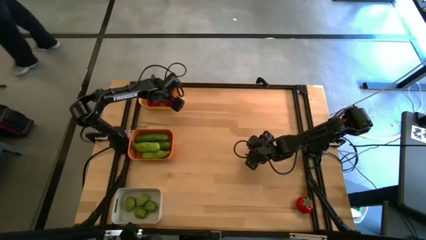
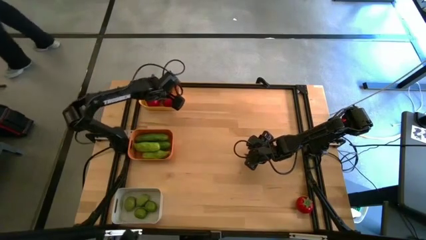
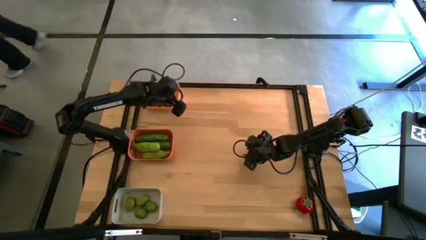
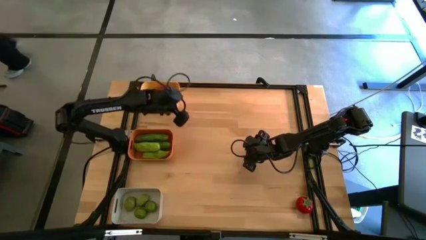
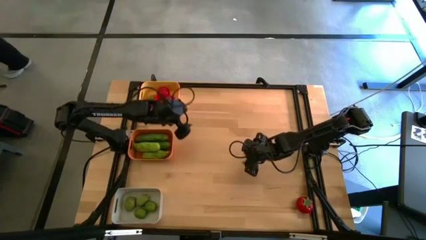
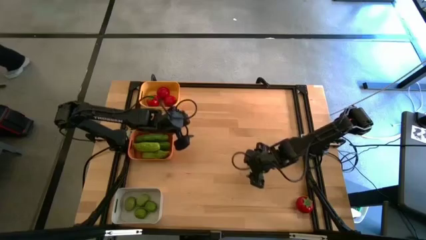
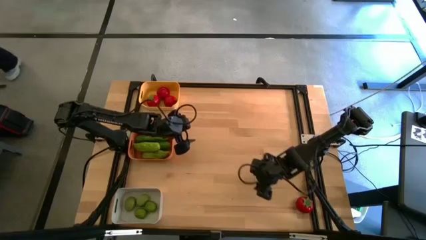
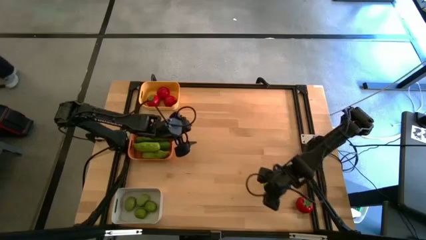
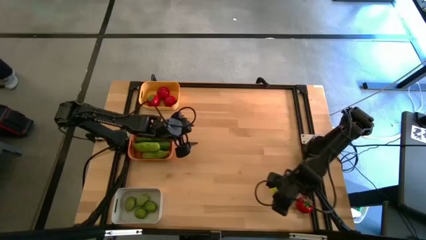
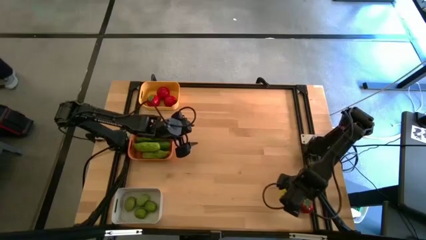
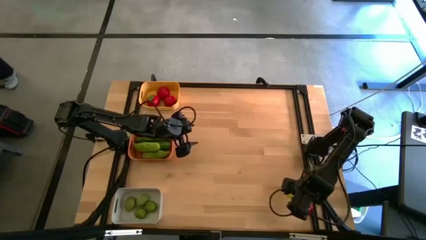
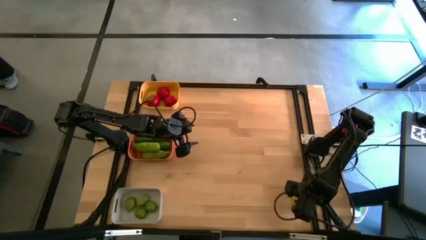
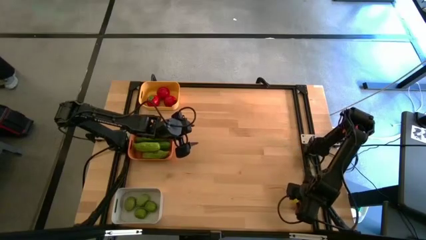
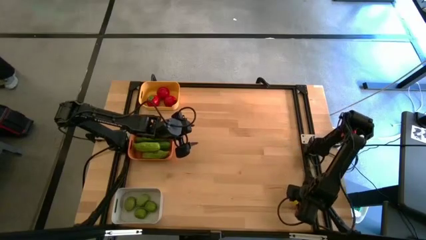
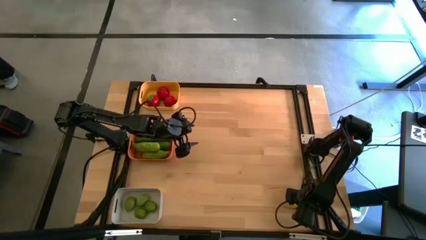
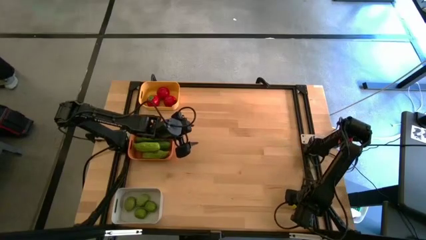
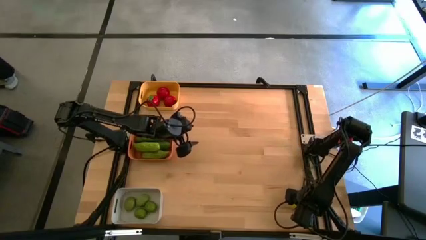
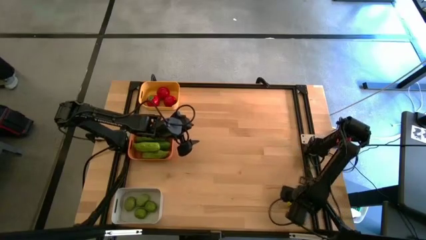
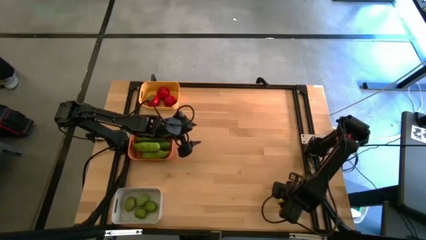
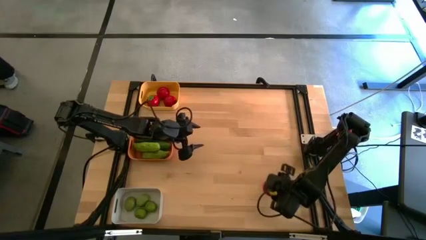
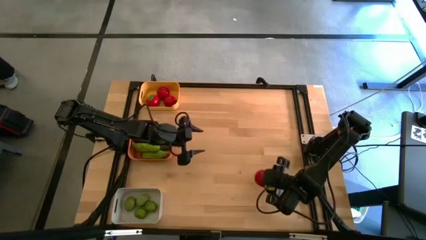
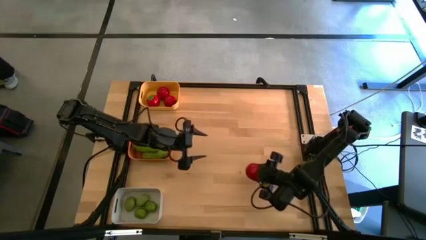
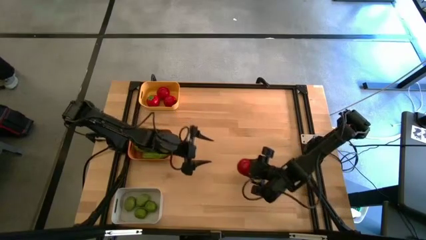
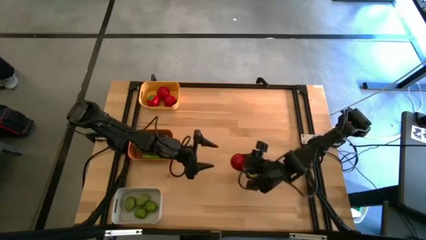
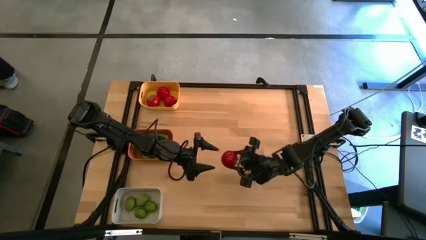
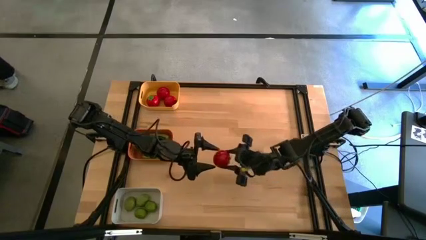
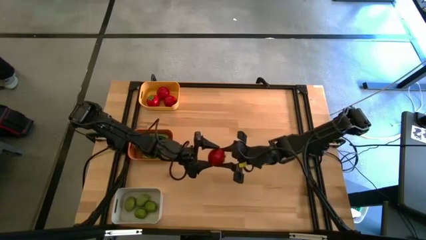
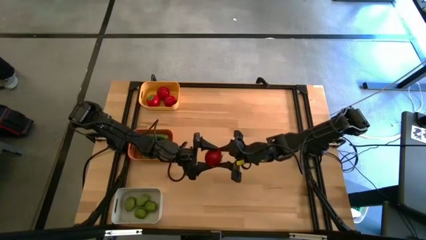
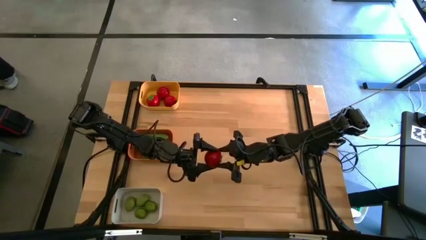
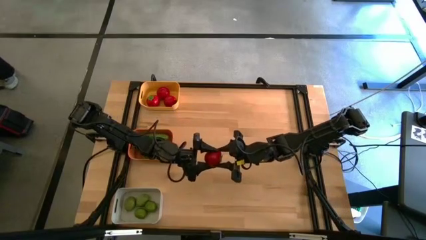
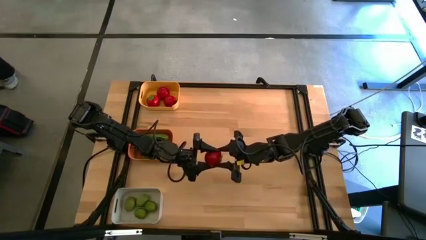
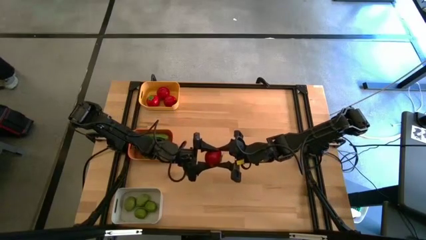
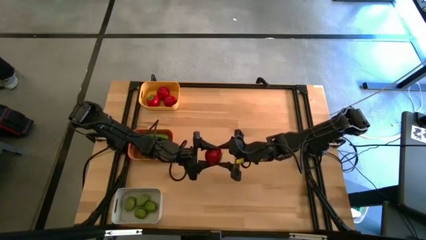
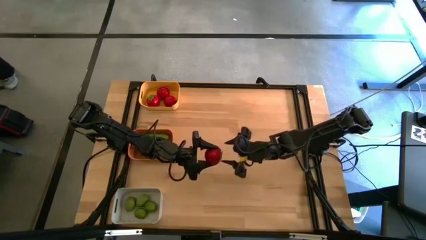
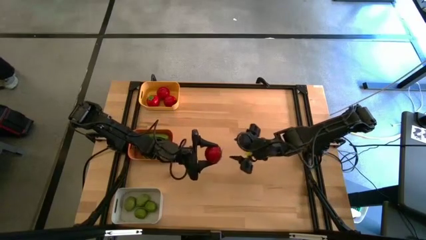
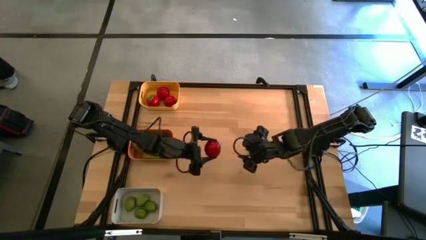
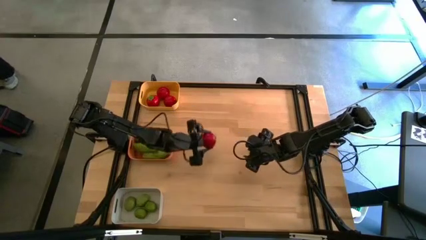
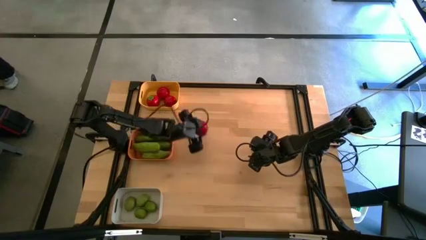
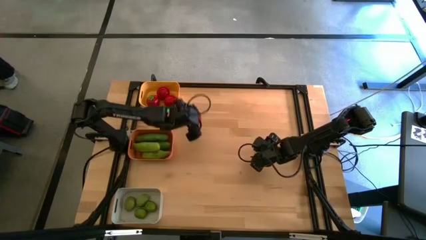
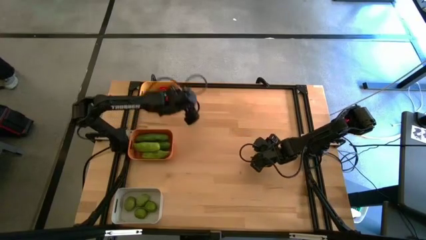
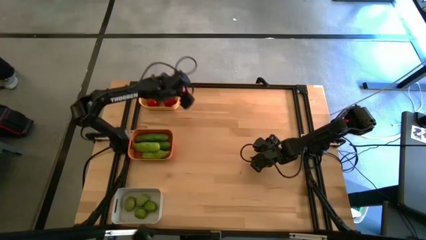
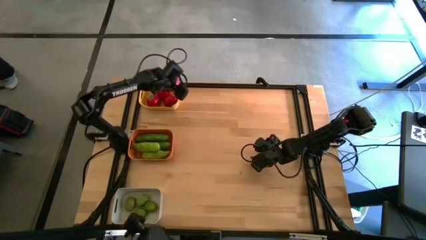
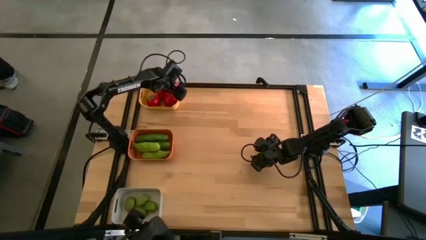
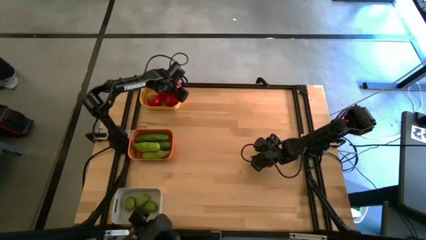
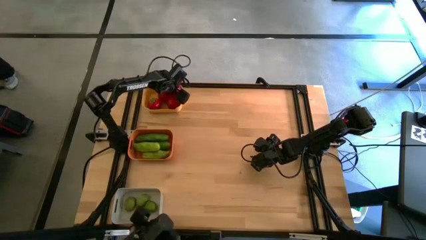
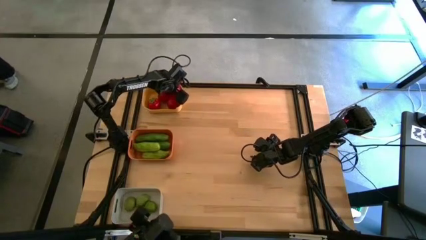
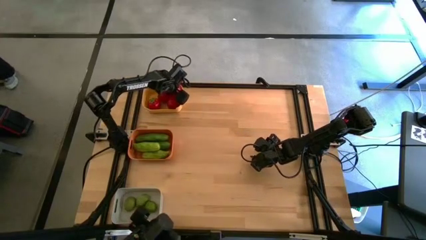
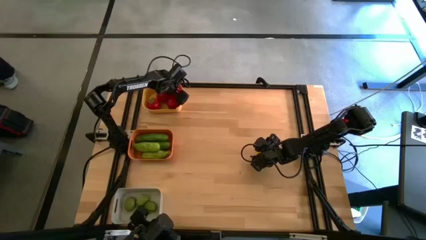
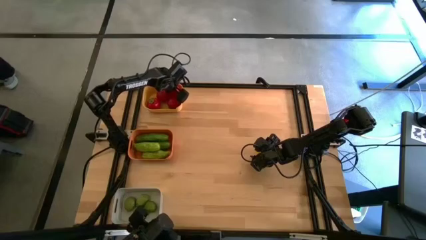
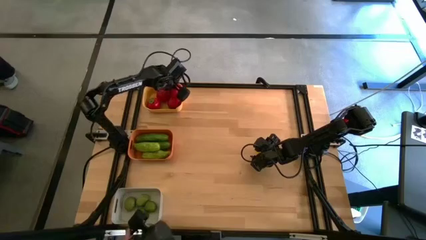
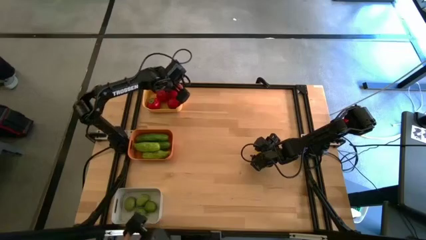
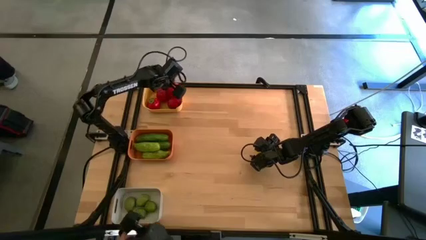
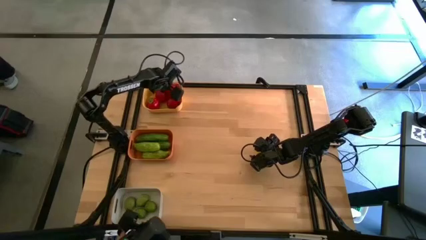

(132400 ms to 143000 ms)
Task: Sort produce into baskets
Put the tomato into the yellow bin

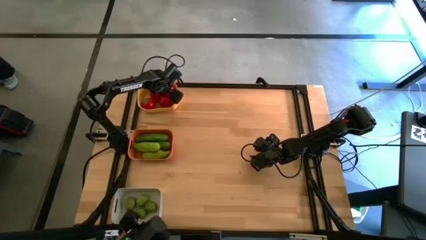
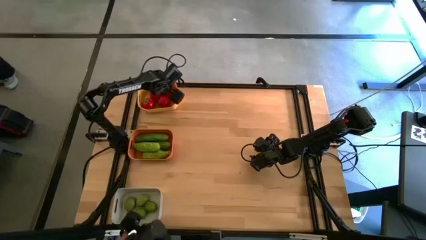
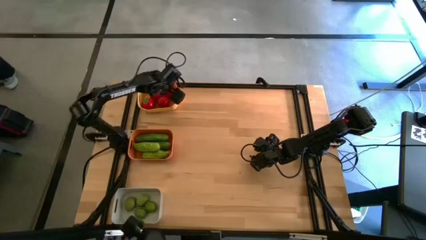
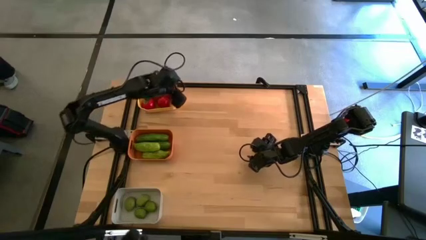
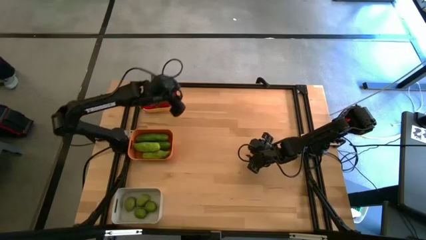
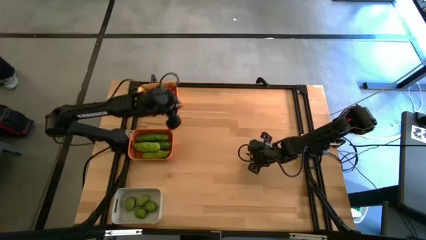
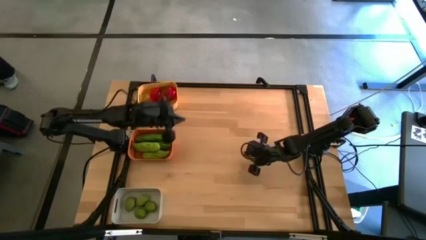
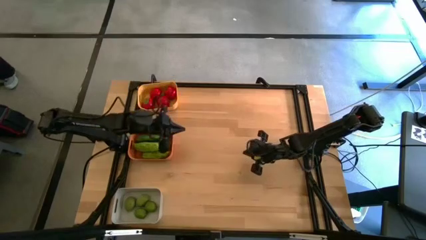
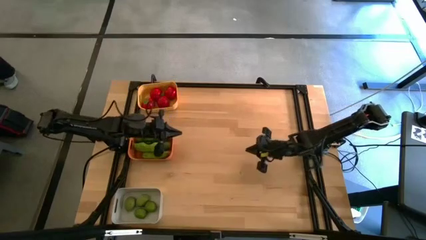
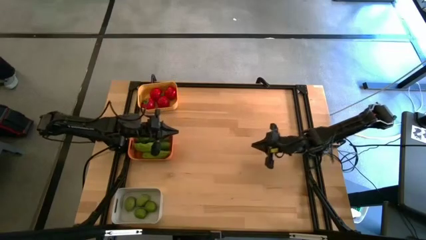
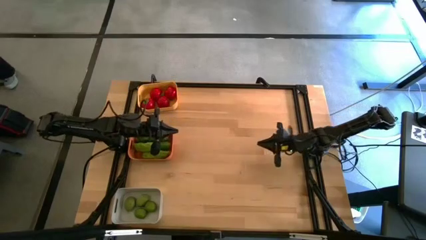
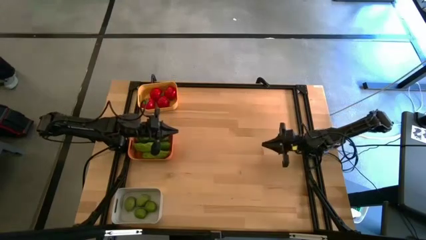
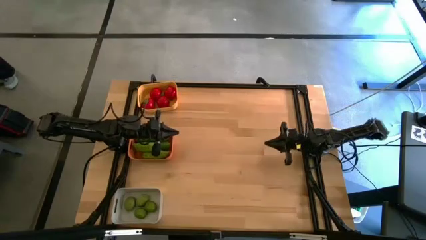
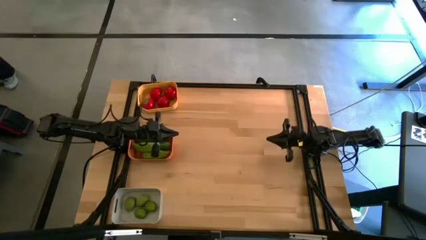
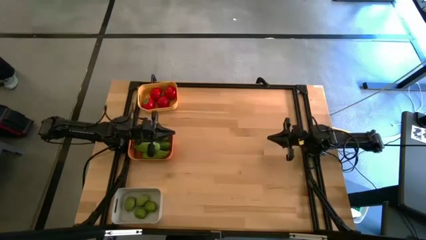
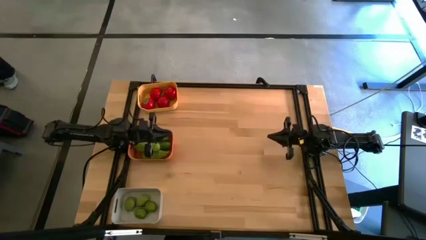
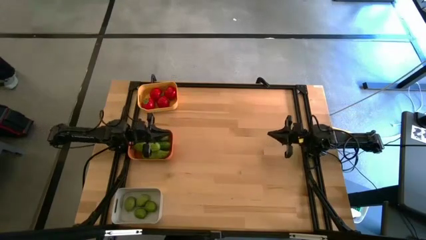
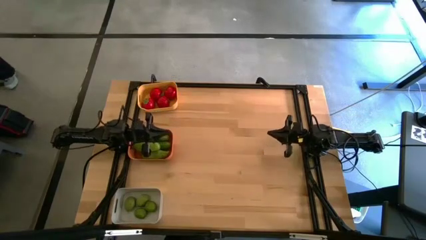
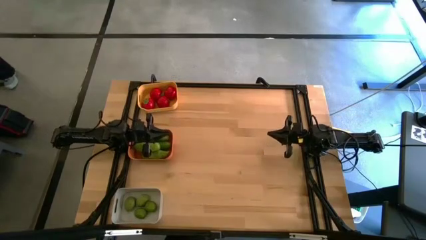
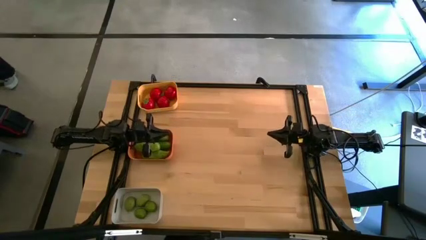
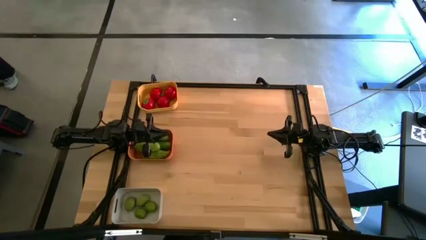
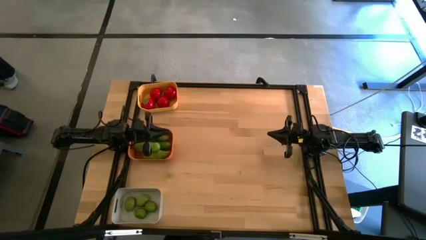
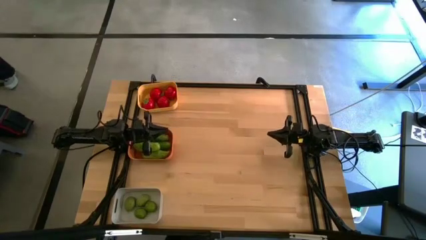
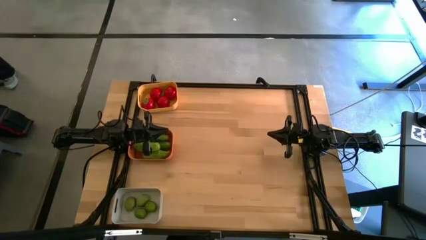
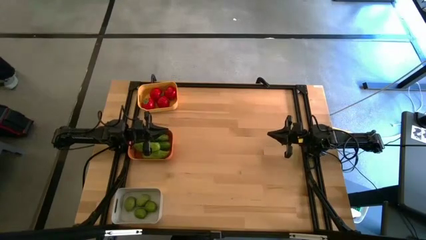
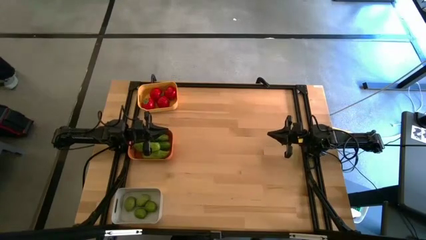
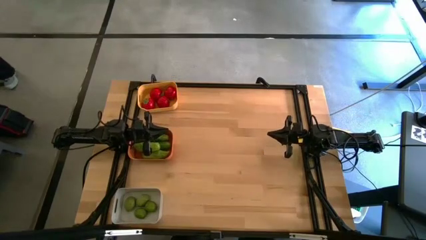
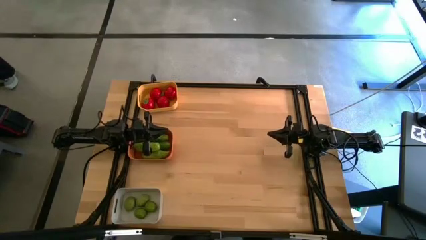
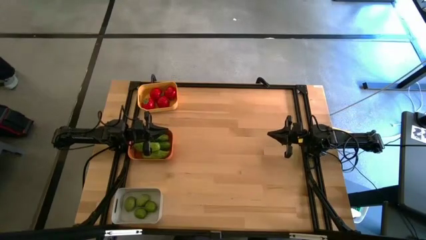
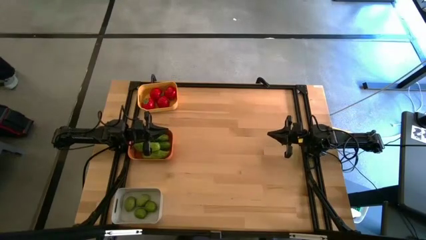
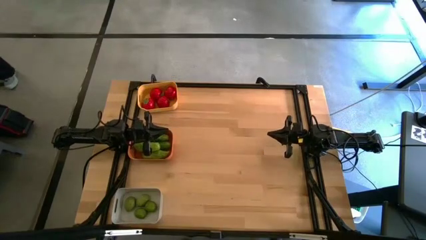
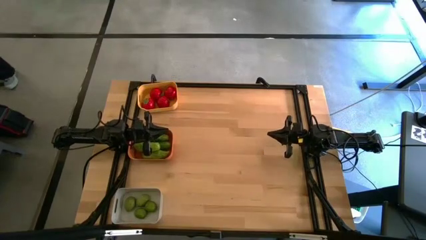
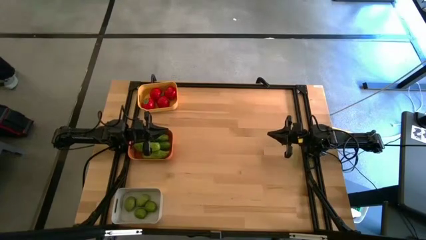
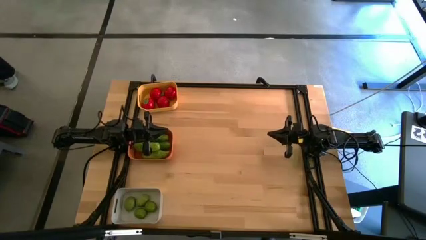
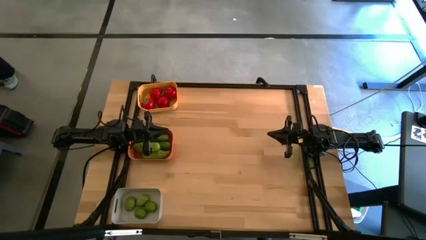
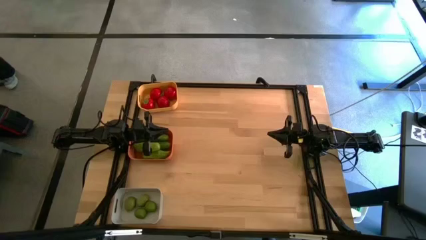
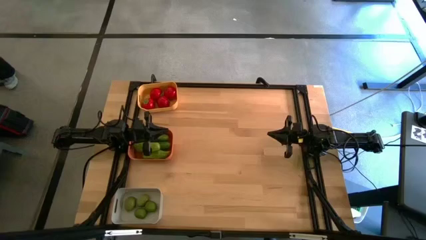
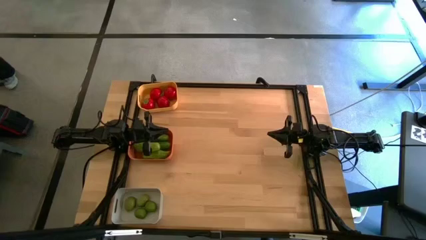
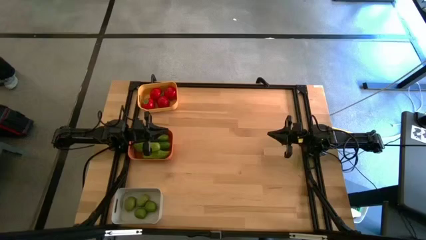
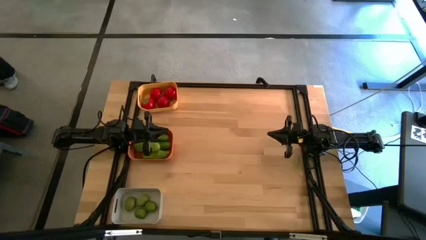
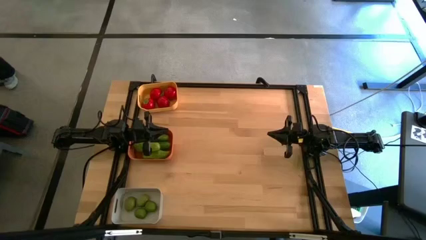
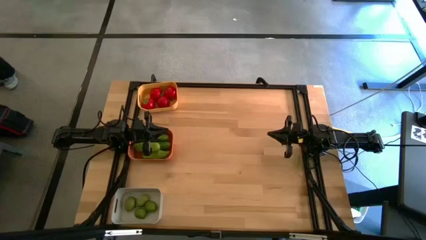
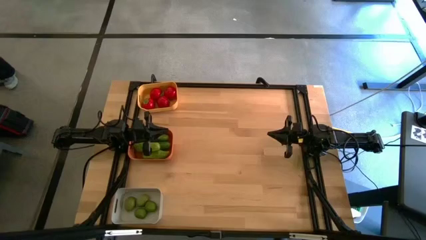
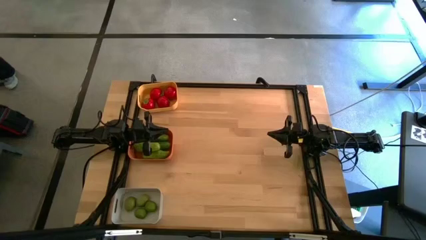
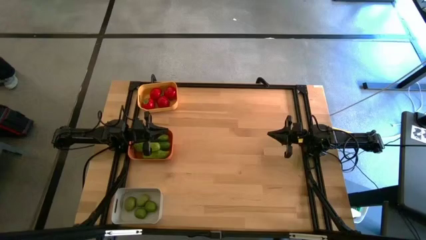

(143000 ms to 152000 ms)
Return to Home Position
